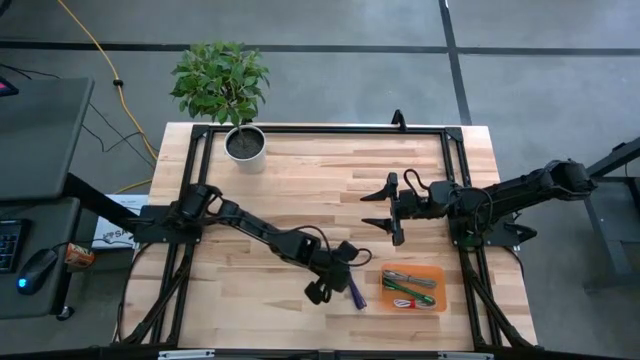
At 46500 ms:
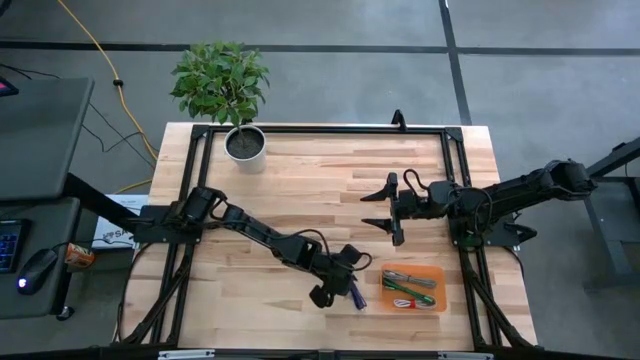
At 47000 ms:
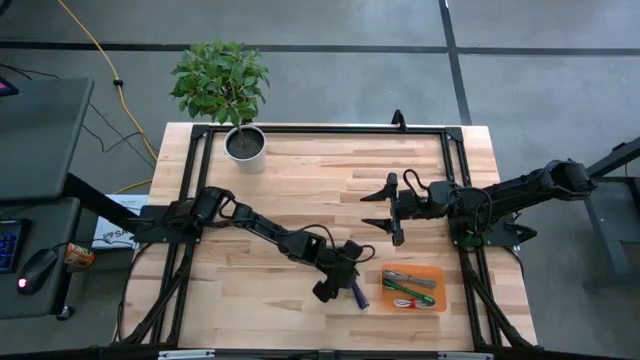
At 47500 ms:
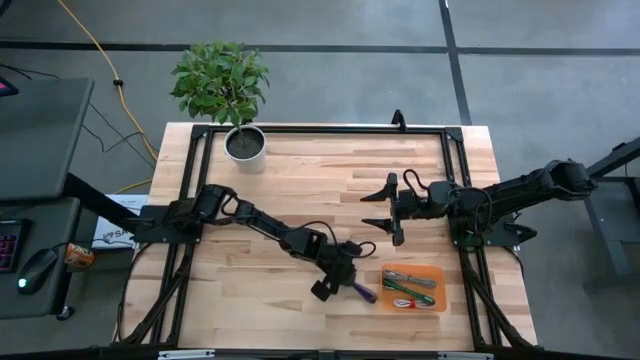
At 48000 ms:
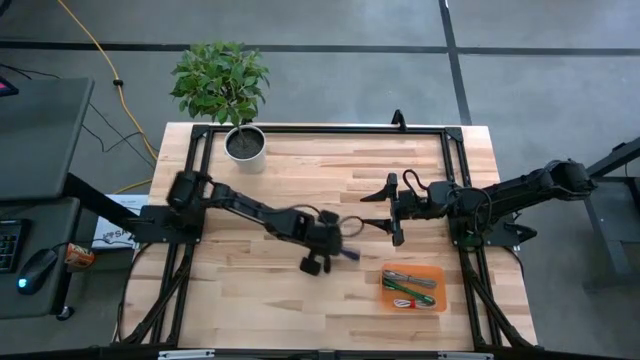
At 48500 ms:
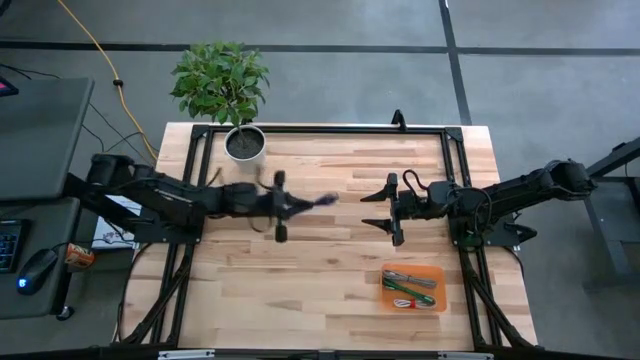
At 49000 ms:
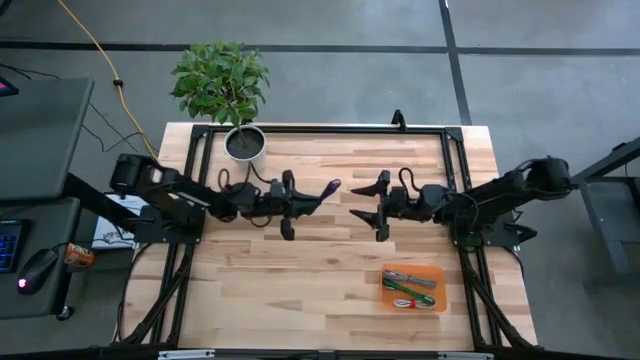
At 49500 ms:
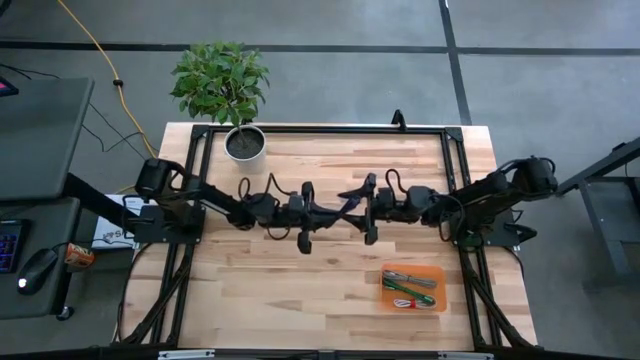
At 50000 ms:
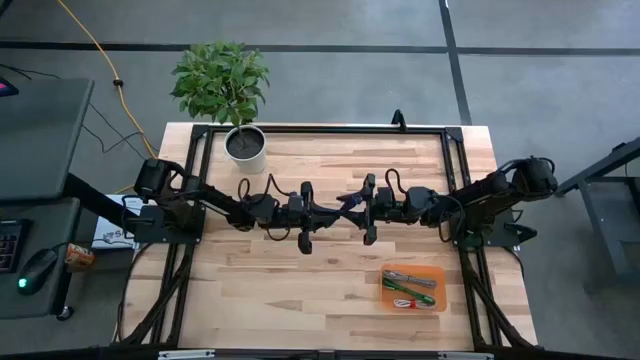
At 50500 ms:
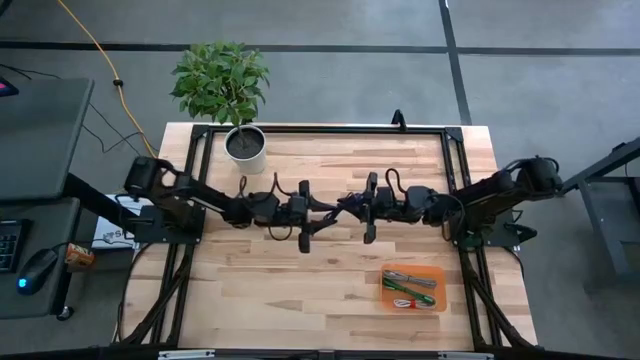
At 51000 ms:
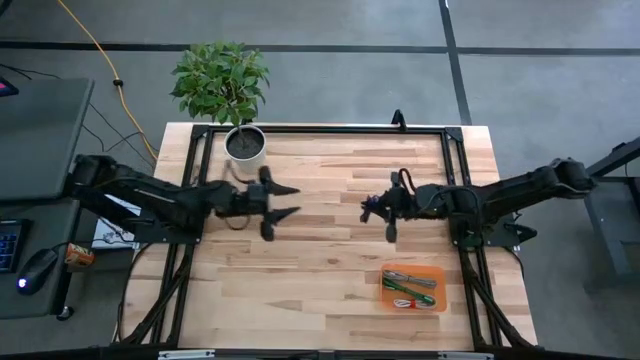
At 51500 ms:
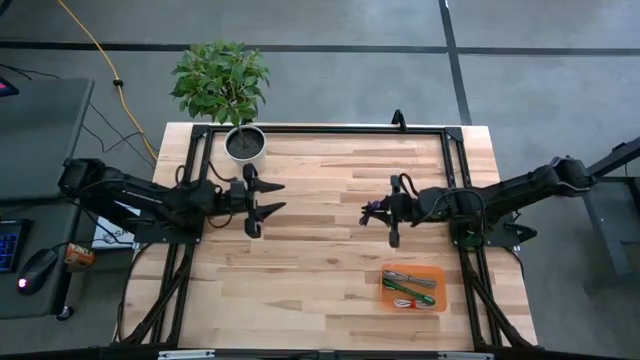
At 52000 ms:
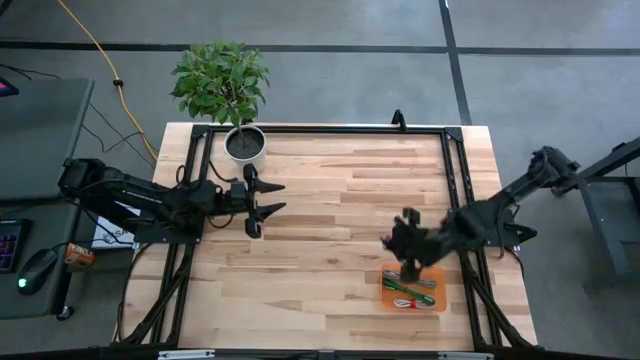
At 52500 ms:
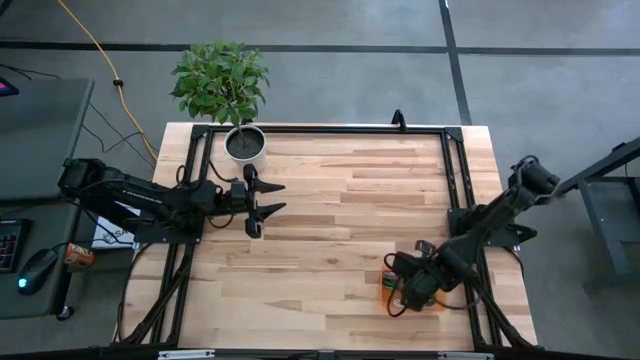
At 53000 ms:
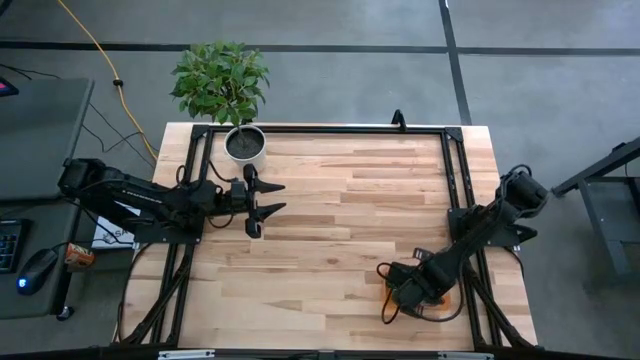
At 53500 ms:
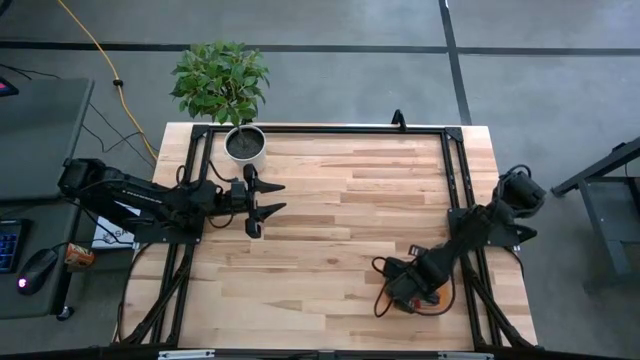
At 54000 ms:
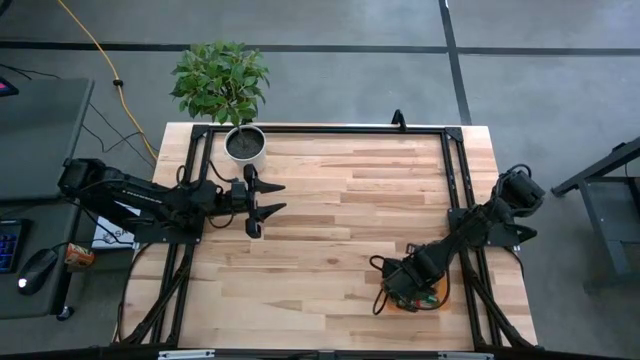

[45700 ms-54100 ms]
Task: Pick and place USB-C Cables
Put the blue charger cable into the orange bin

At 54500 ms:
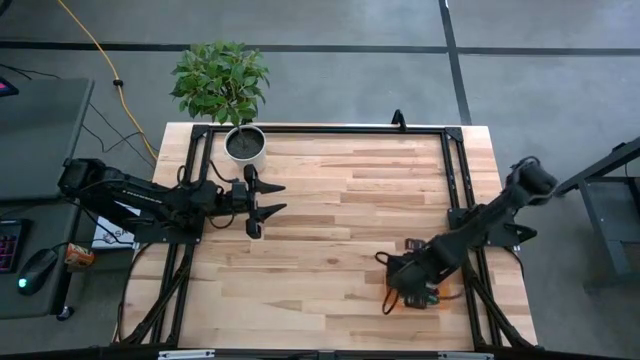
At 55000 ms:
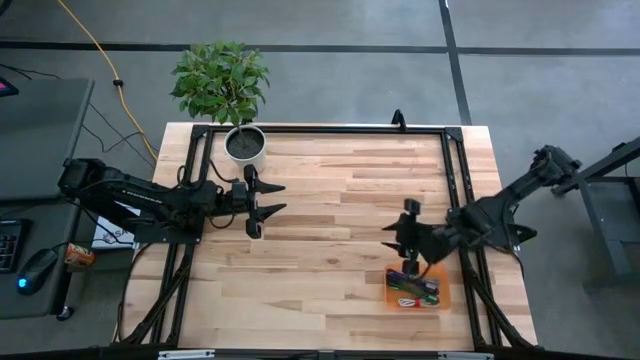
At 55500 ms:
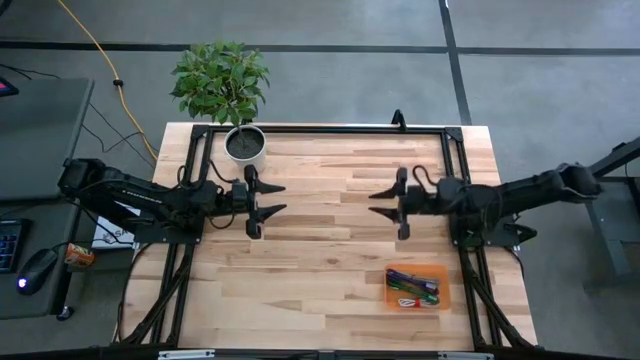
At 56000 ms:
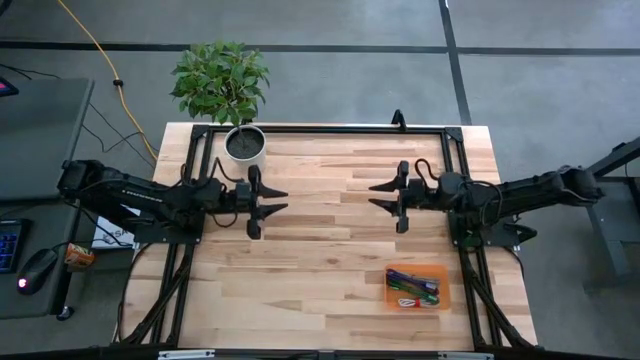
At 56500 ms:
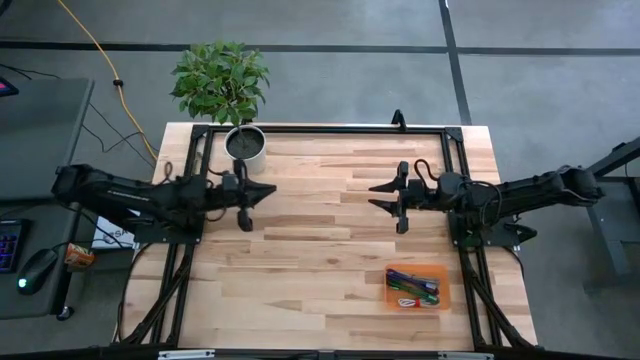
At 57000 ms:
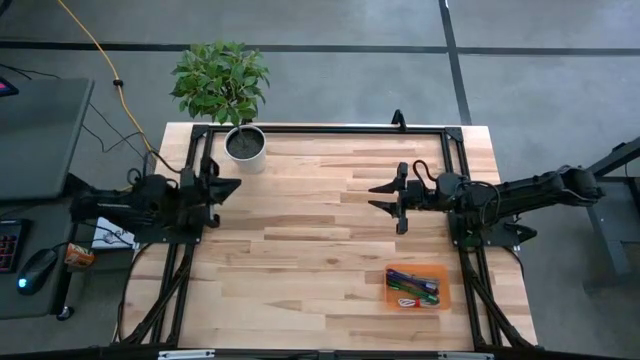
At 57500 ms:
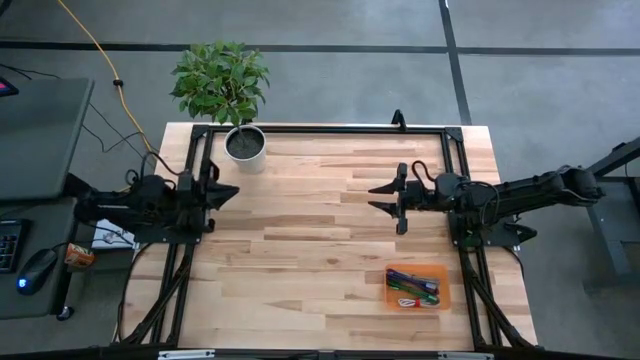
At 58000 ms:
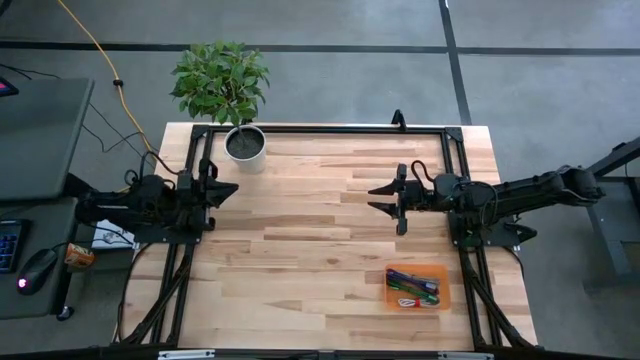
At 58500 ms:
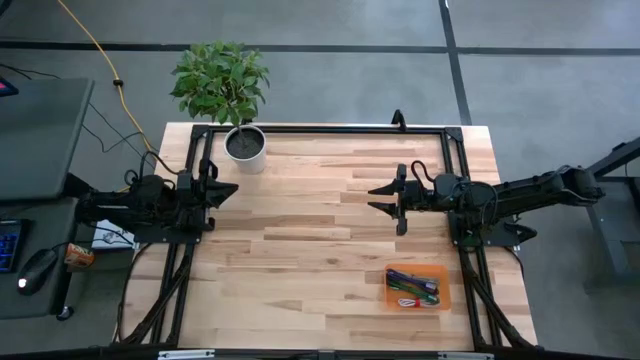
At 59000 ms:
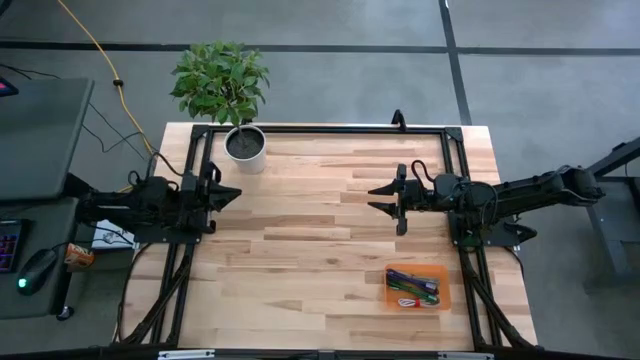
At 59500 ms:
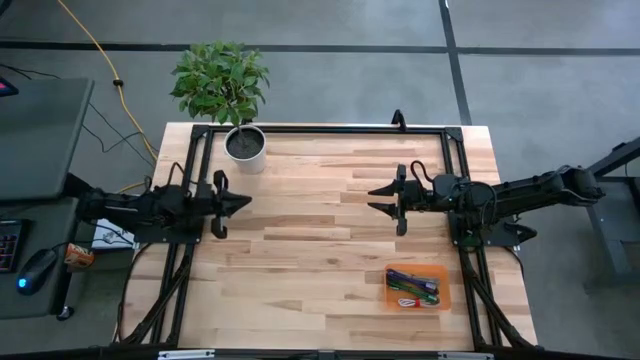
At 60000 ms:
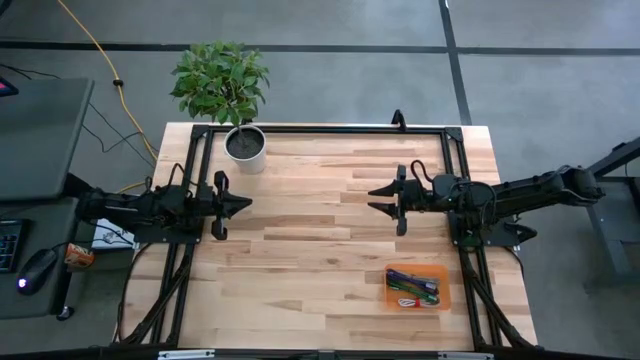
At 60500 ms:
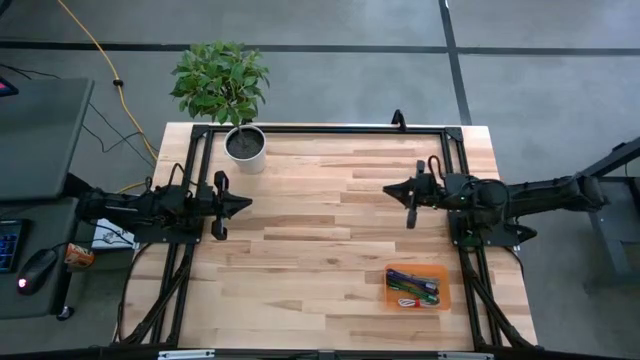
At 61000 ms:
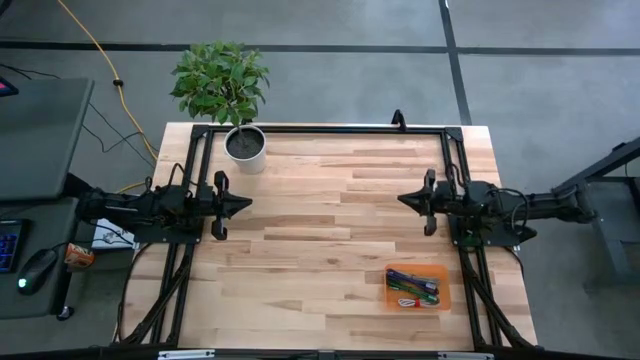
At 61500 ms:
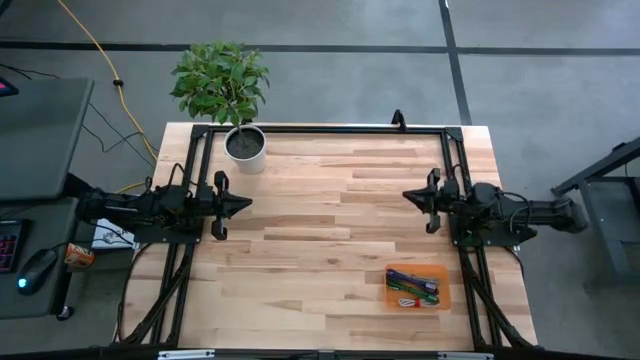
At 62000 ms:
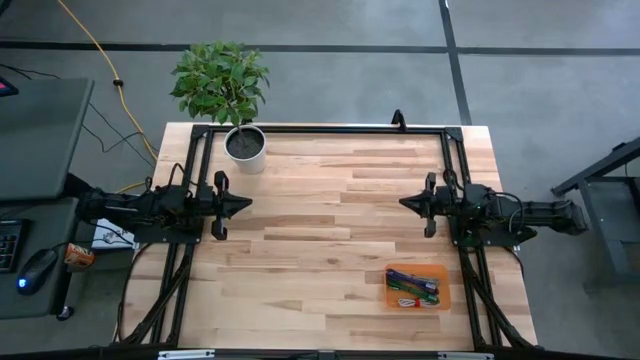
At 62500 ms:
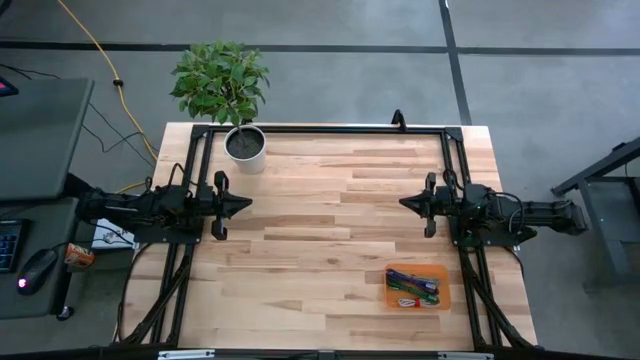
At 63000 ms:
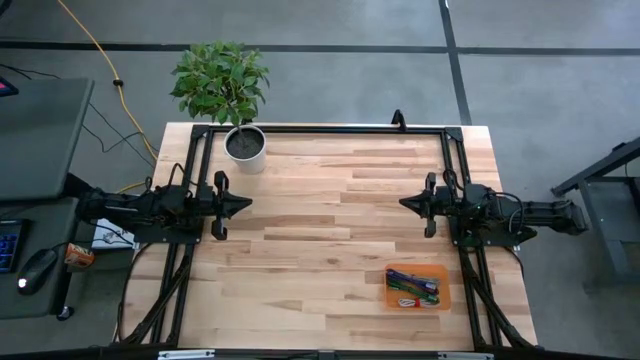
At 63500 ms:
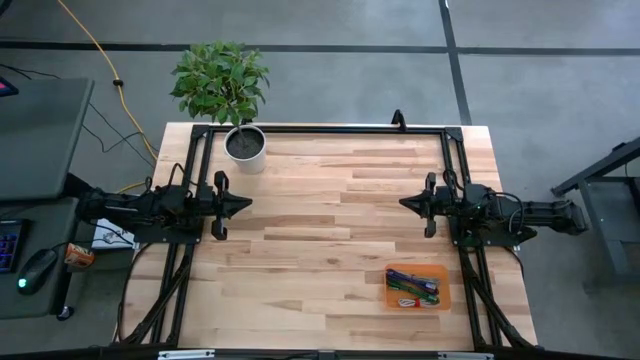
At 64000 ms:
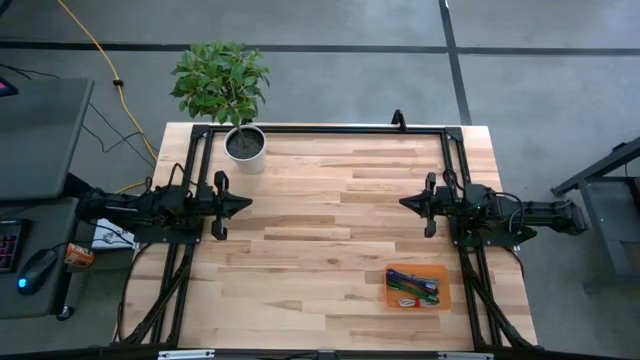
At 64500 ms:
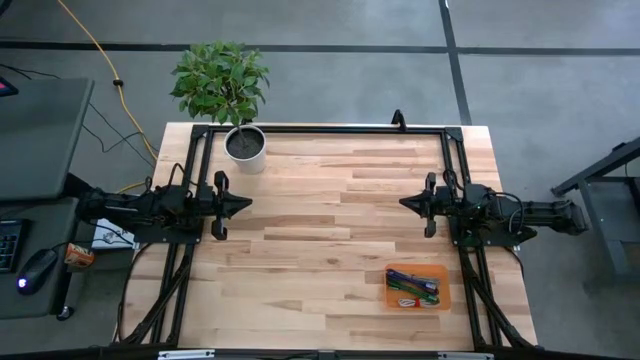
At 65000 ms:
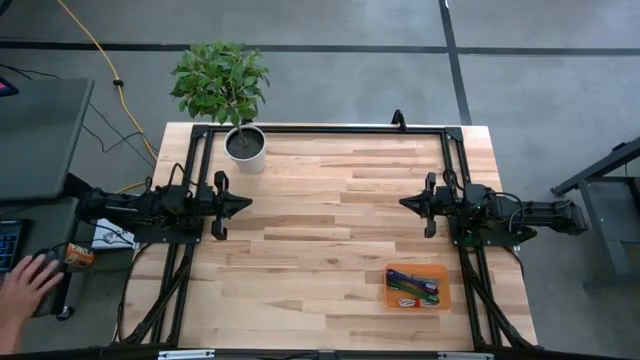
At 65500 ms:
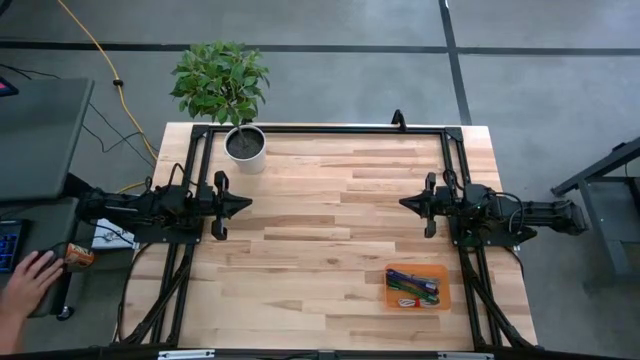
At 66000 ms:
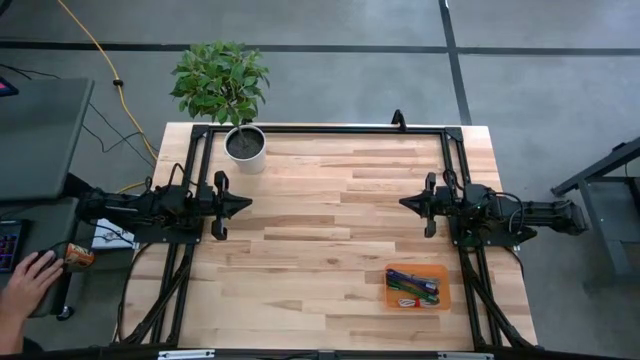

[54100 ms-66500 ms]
Return to Home Position

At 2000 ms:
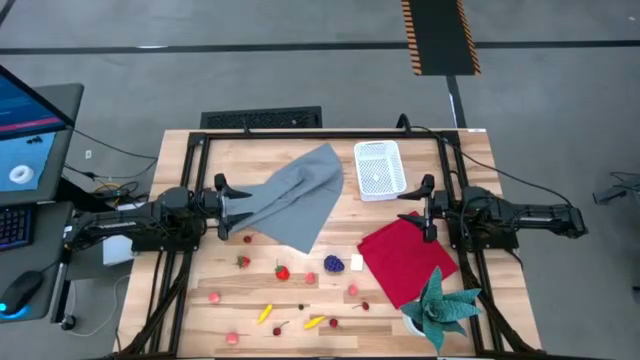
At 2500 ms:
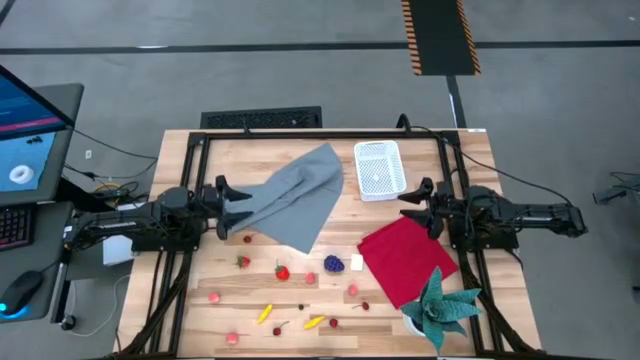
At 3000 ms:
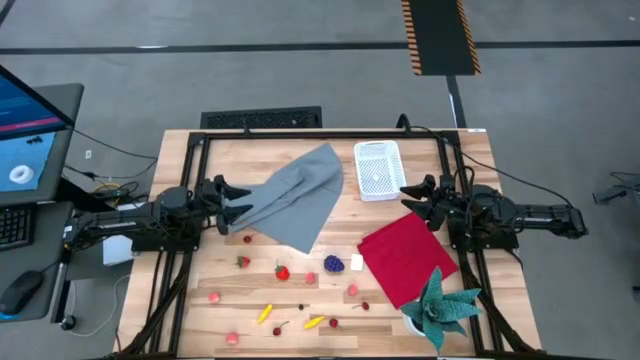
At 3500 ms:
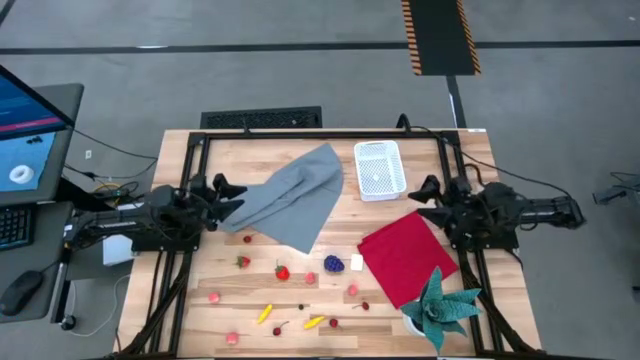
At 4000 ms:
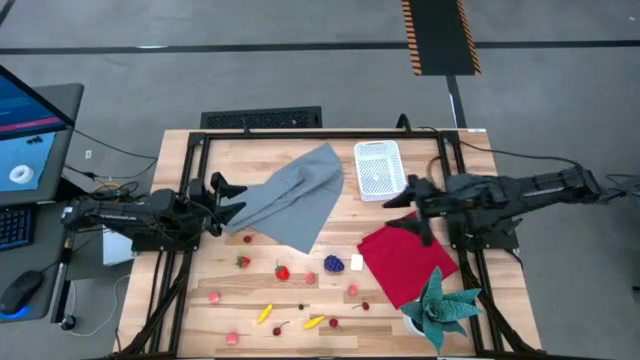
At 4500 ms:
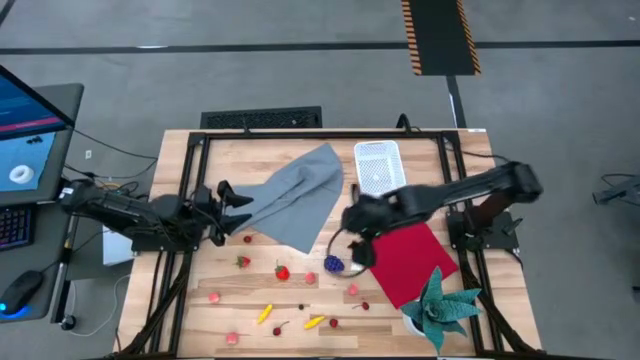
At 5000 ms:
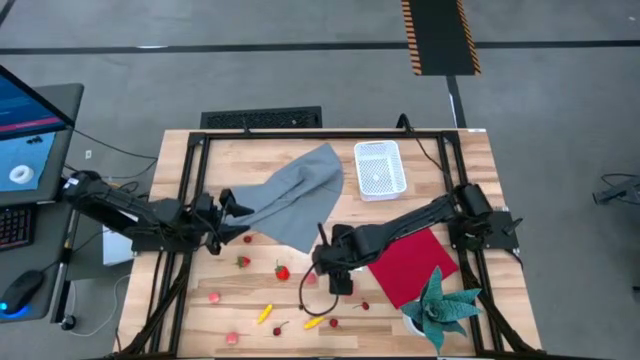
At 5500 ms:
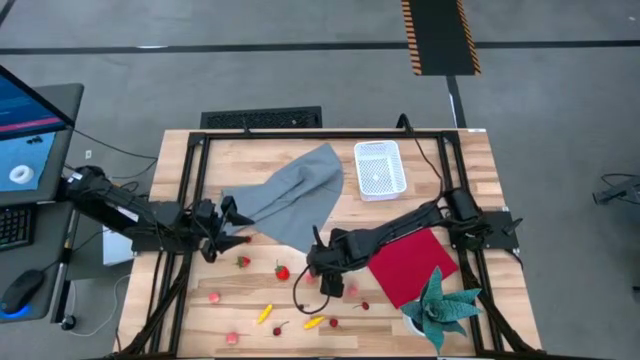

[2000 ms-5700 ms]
Task: Pick and placing Produce into tupperware
Put the purple grape into the white bin
